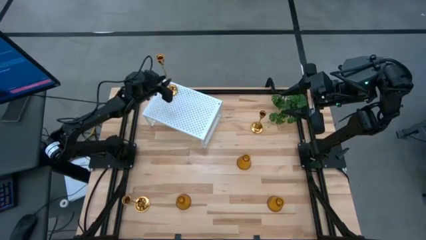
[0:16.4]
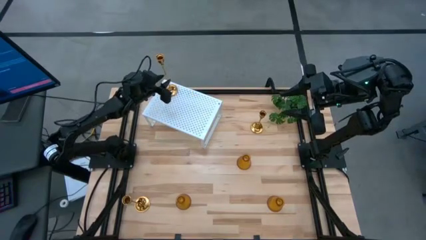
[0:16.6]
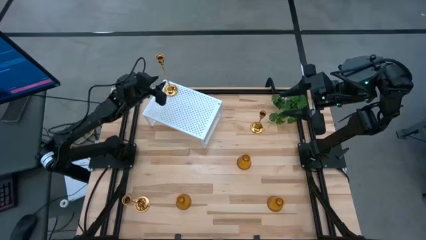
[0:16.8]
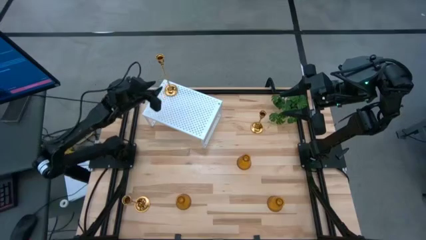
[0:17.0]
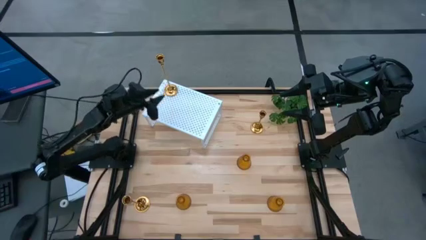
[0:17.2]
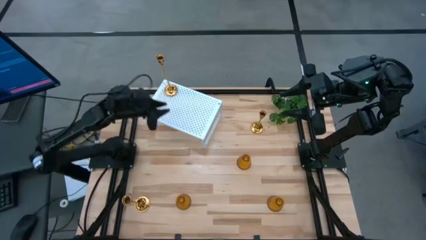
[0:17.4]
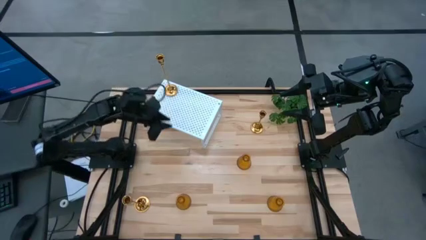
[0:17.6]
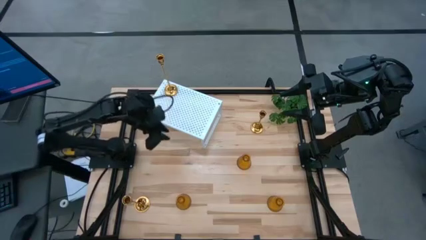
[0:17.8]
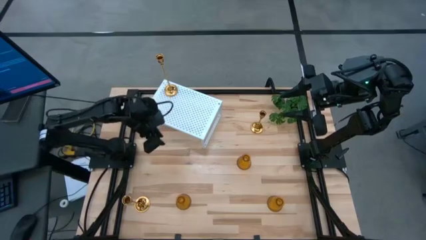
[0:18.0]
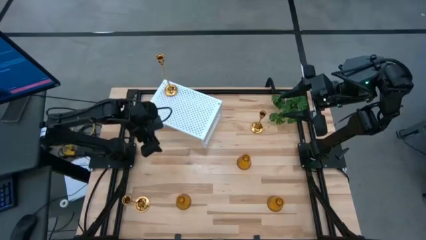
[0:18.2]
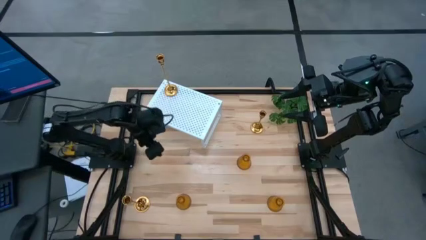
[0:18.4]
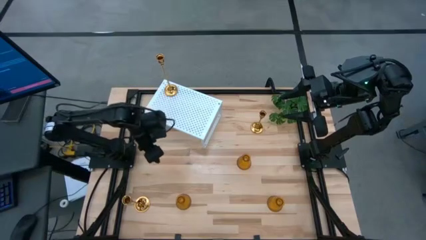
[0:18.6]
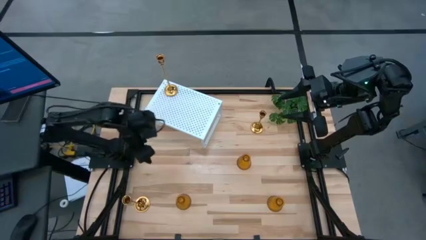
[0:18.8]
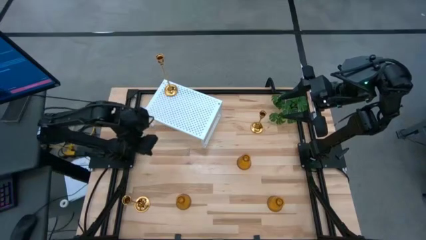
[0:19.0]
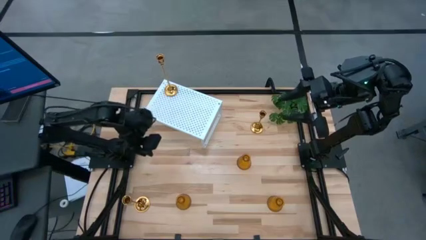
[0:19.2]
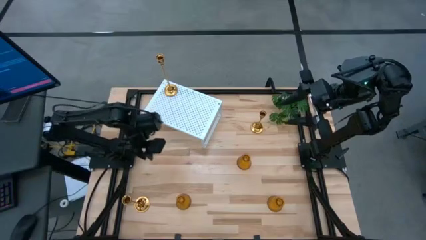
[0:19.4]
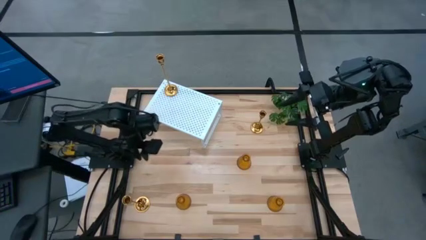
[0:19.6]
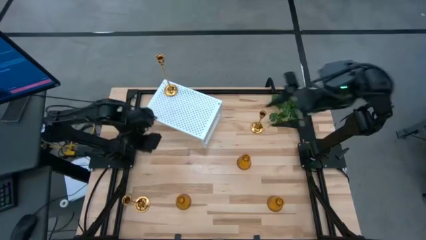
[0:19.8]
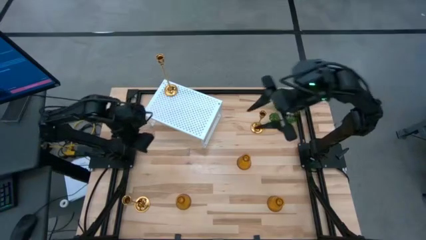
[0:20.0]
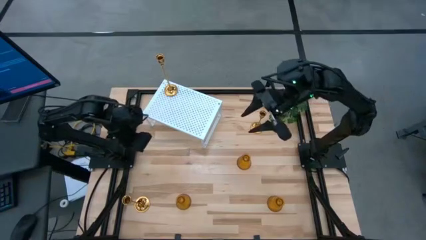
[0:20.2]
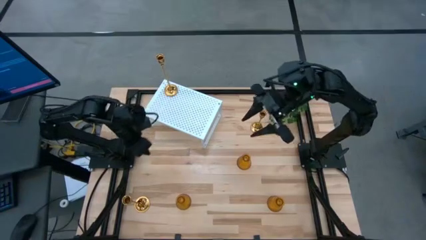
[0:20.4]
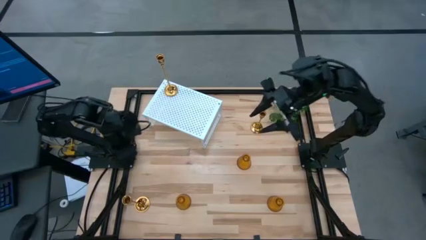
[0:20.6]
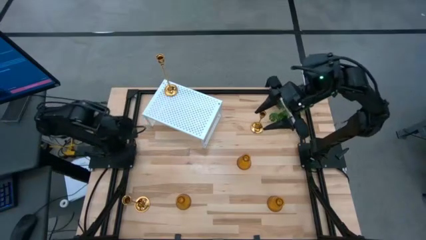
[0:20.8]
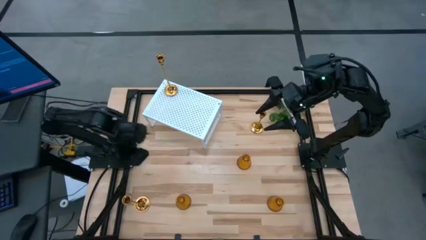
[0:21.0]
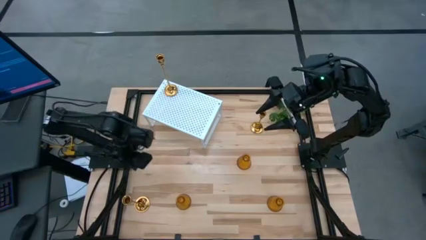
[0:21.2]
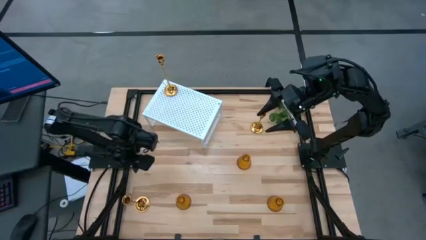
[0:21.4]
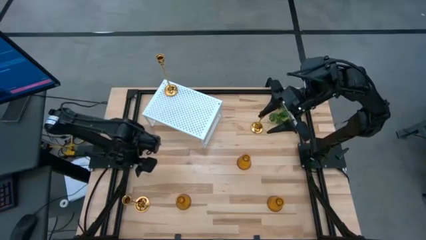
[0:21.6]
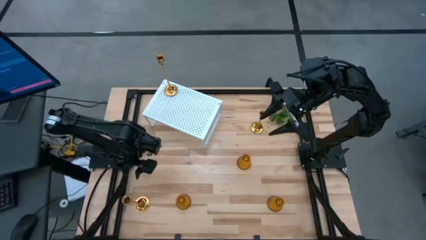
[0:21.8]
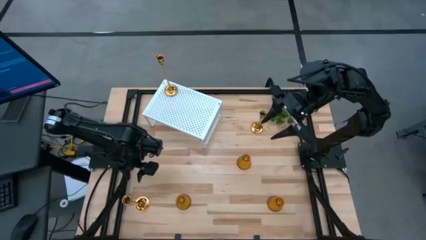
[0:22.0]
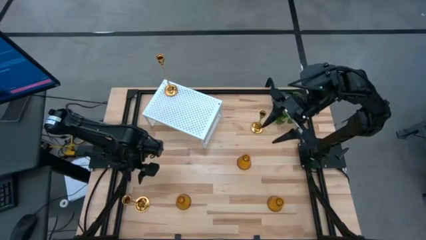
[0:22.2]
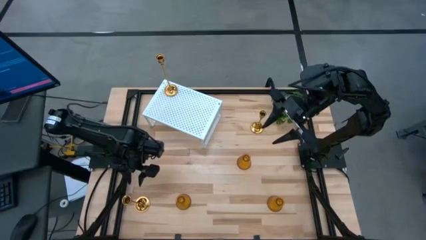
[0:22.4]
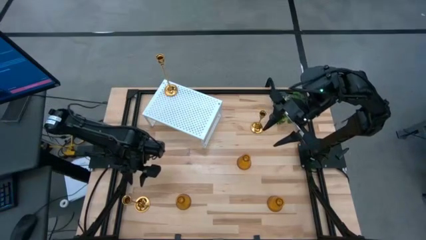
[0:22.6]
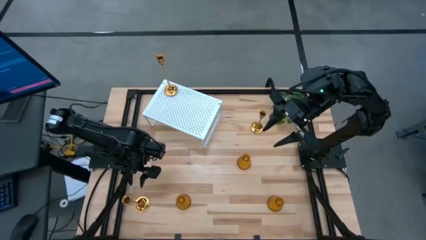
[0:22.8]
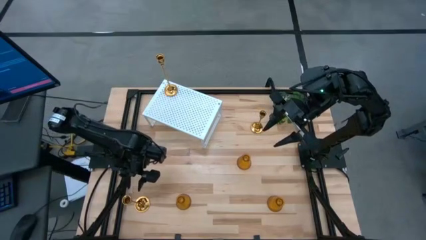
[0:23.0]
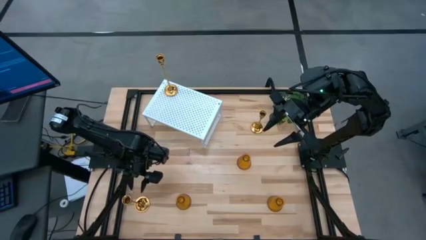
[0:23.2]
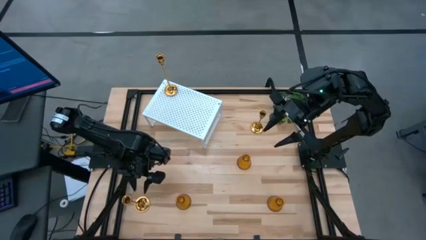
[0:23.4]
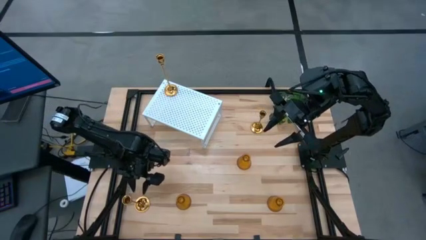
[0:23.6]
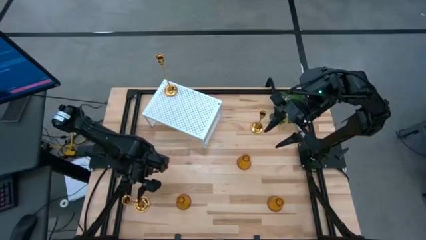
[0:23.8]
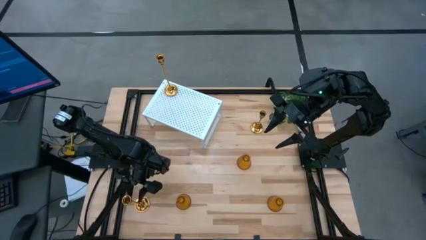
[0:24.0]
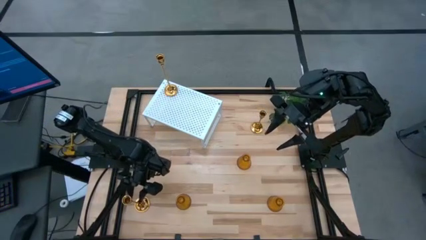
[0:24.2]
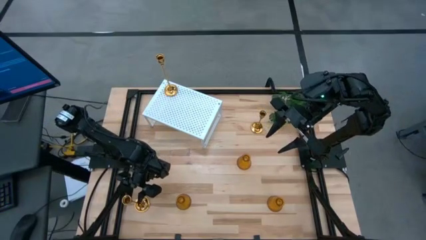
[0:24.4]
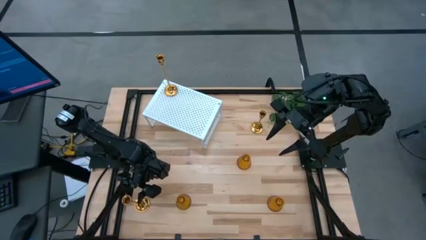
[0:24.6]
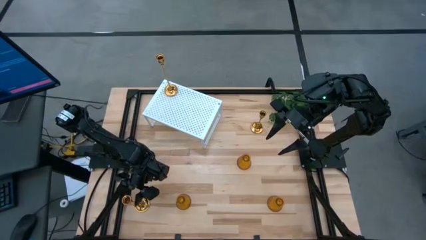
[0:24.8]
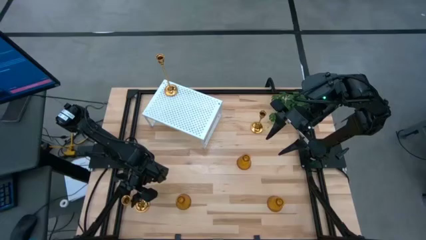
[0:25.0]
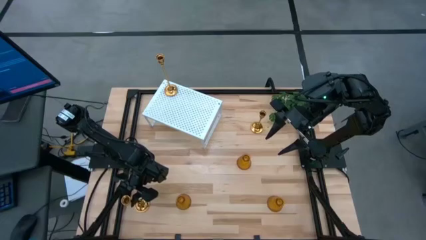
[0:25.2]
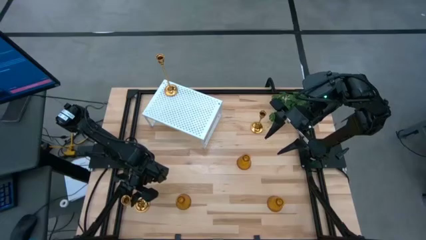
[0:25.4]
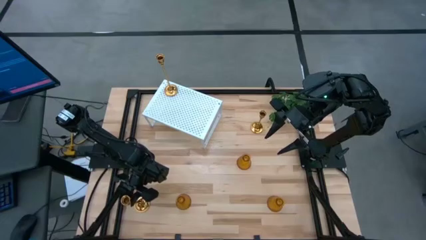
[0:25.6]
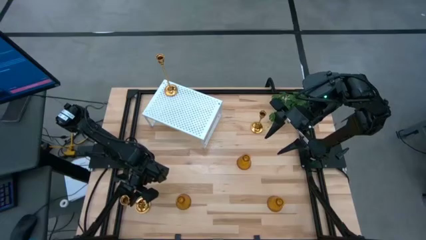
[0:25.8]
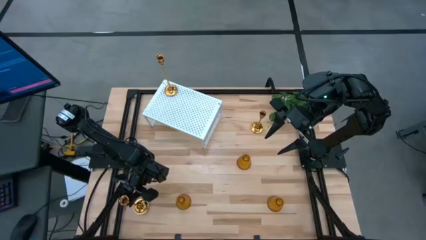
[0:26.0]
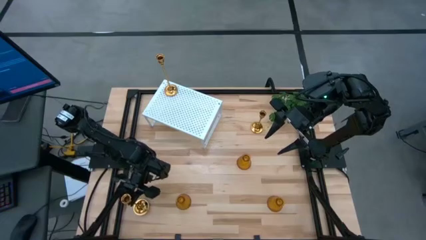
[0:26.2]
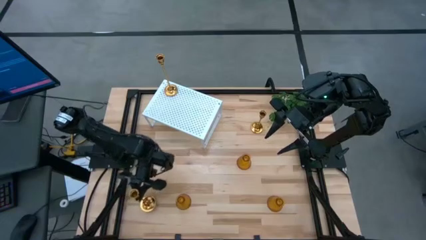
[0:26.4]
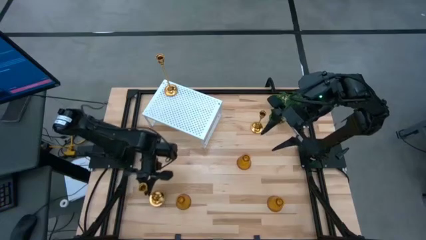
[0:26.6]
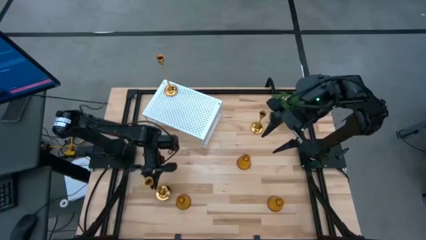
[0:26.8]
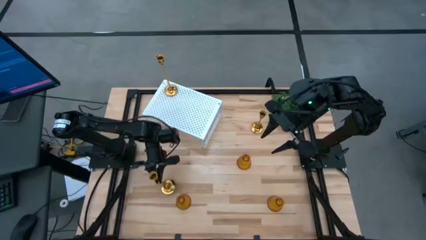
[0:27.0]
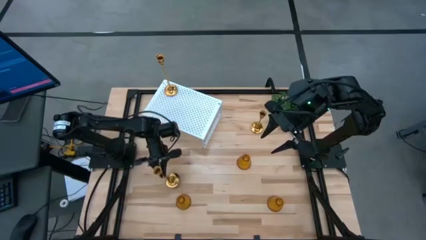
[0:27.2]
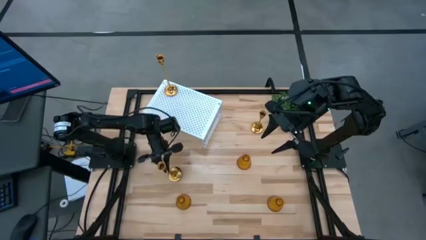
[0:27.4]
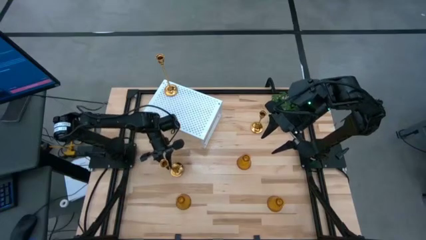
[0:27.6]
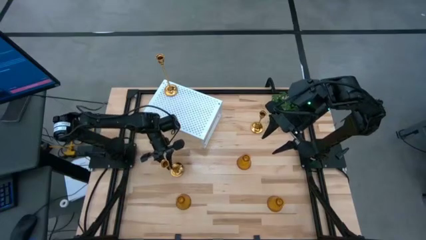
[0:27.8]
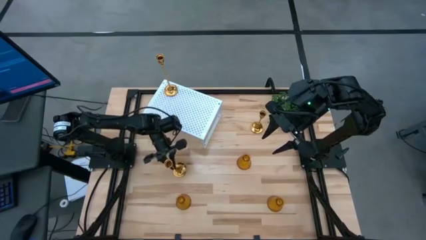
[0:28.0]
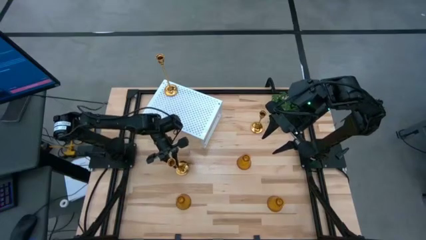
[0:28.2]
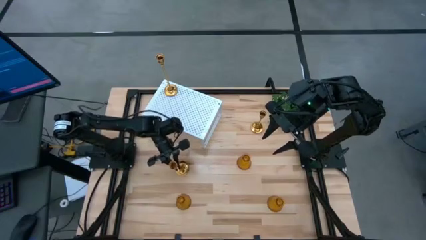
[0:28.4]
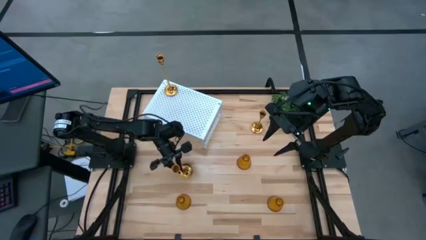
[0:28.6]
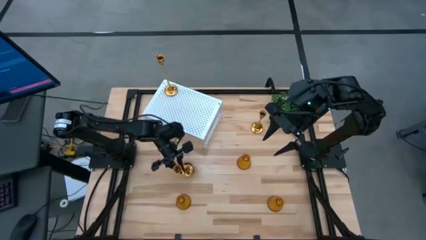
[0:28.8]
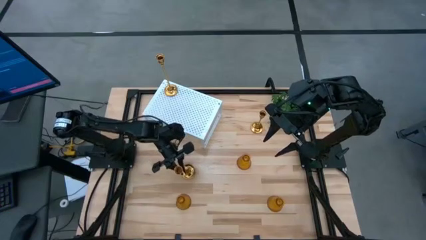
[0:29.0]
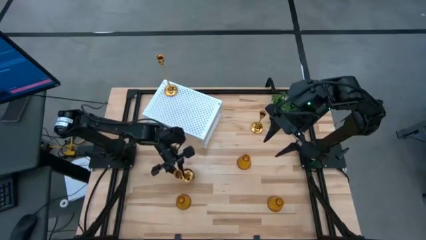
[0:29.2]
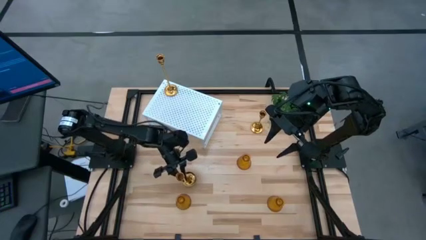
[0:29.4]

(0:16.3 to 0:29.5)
Task: Pick & Place candle stick holders
Put the bottom gold candle holder on the shelf aligned with the other gold candle holder
